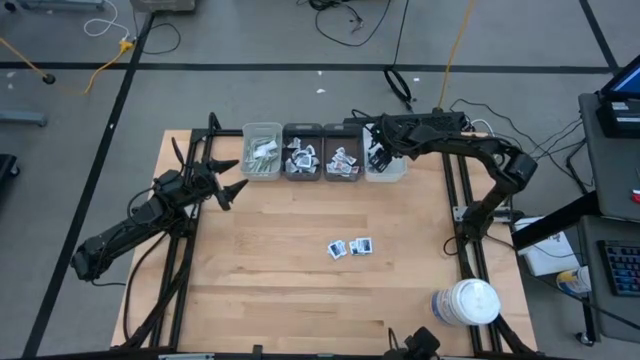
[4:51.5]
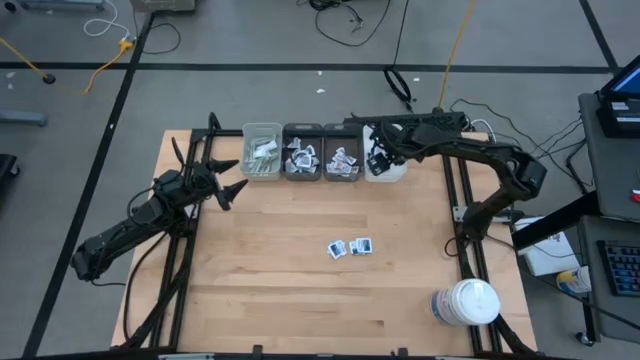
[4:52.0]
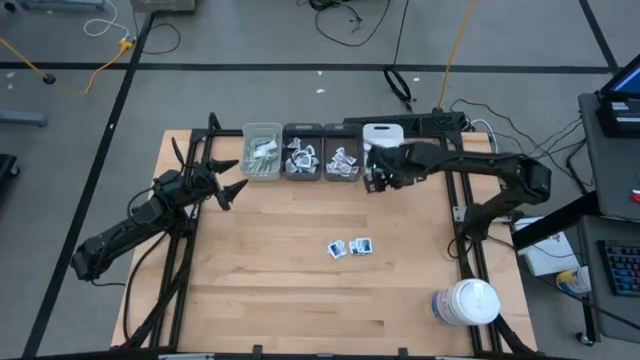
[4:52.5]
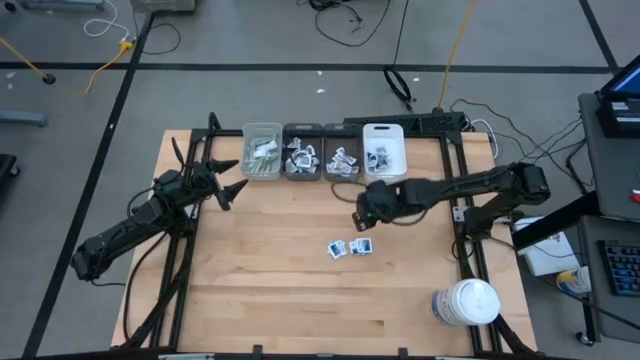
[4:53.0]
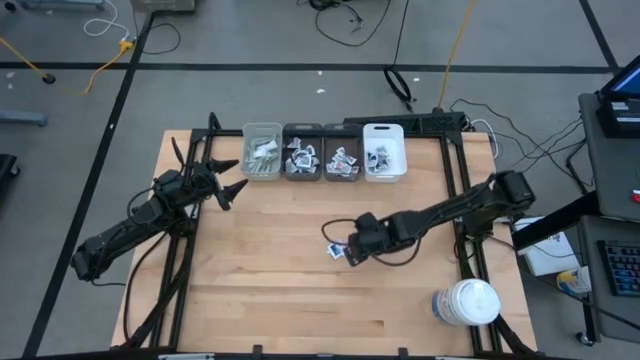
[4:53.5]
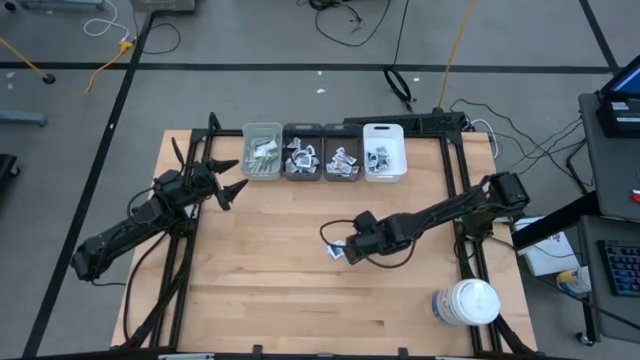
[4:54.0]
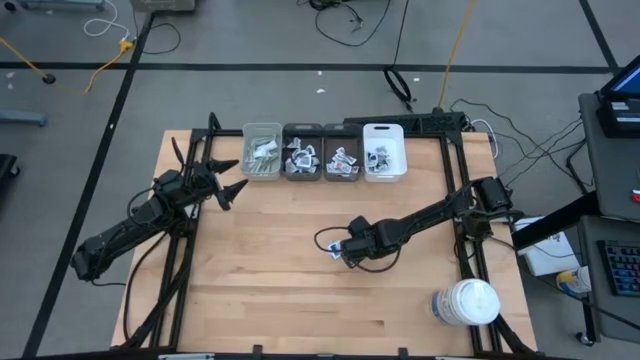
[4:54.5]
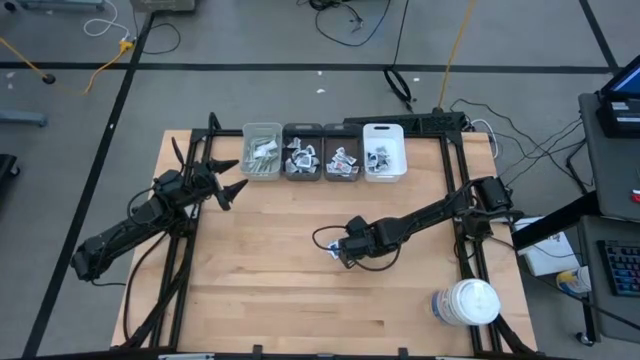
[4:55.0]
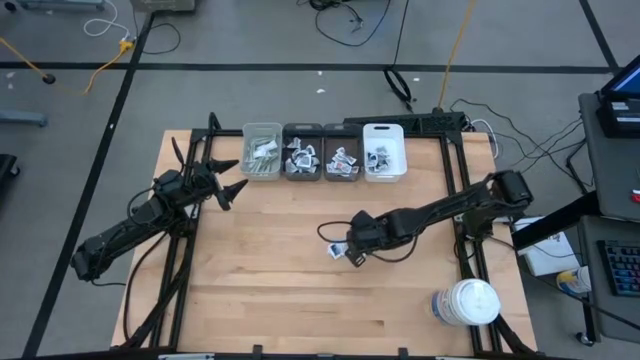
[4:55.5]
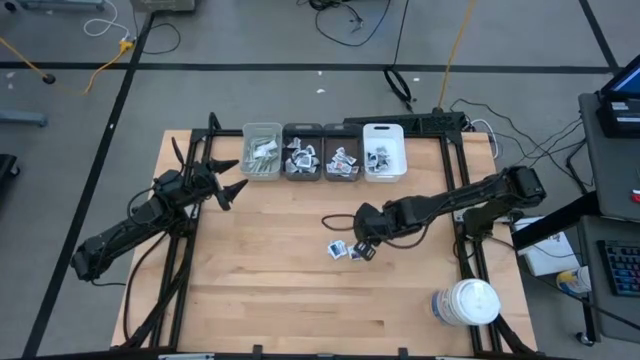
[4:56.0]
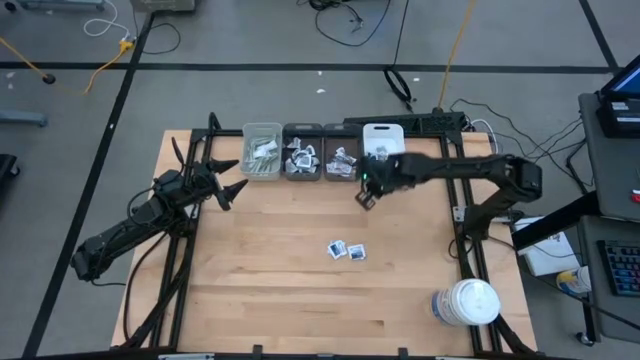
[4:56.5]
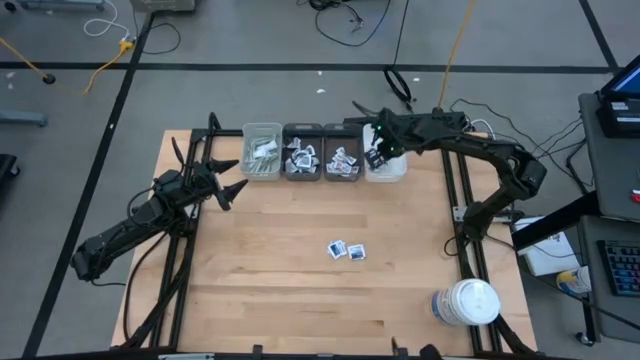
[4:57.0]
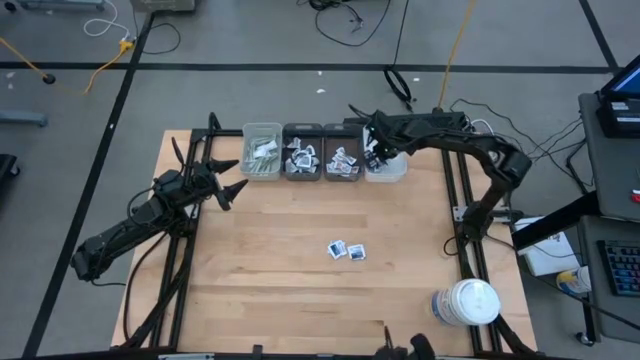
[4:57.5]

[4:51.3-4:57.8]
Task: Pick & Place First Aid Supplies
Put the alcohol pad into the white bin

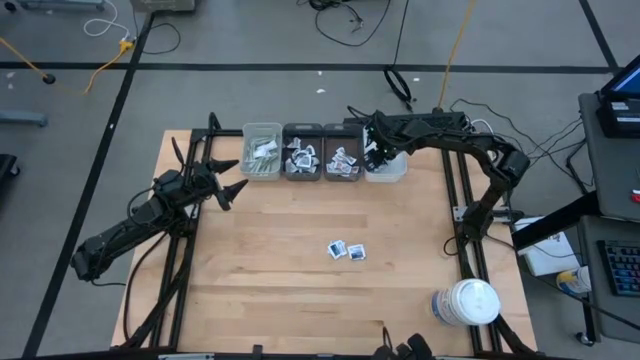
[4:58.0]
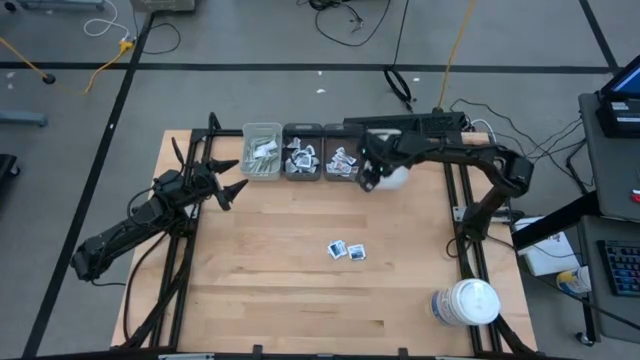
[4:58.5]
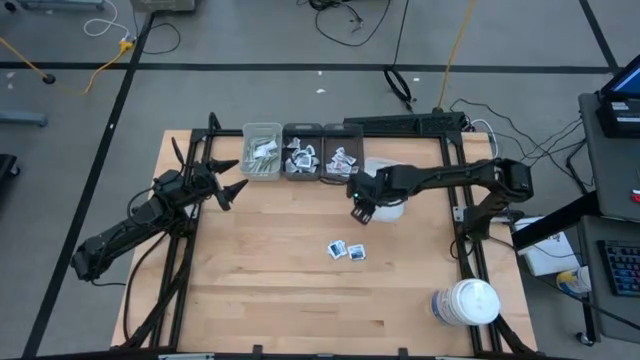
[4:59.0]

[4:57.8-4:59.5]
Put the alcohol pad into the white bin

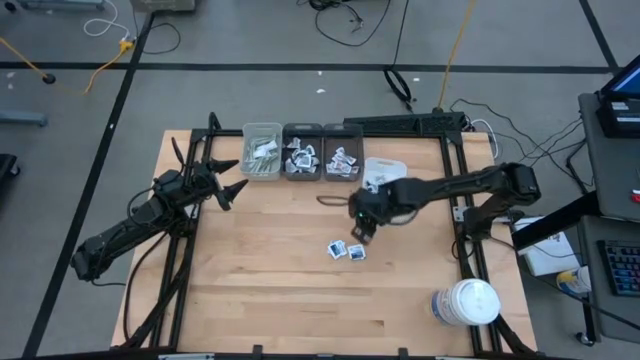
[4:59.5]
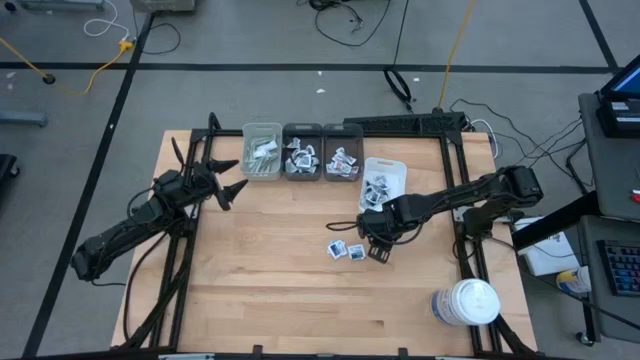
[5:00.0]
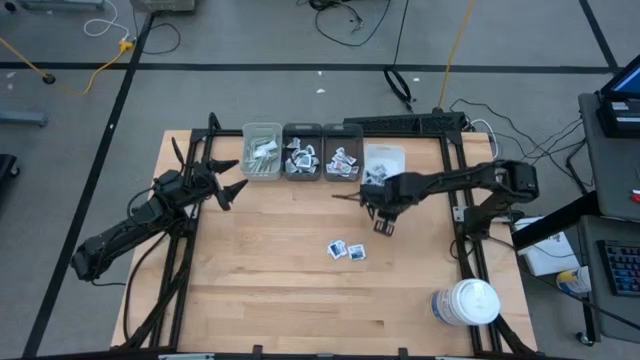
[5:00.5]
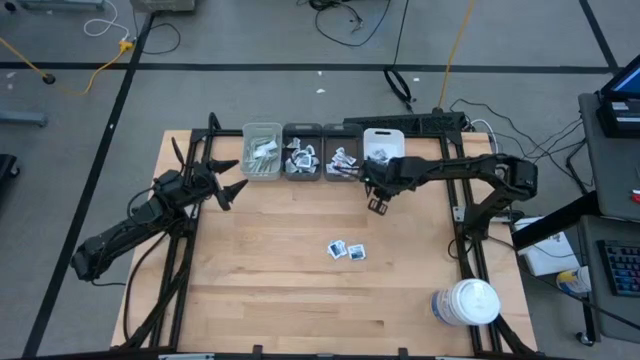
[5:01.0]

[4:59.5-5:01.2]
Adjust the white bin

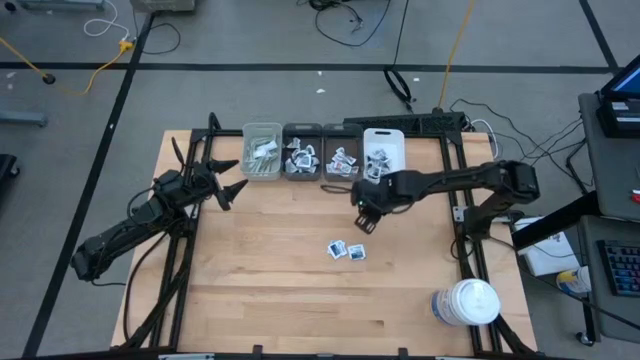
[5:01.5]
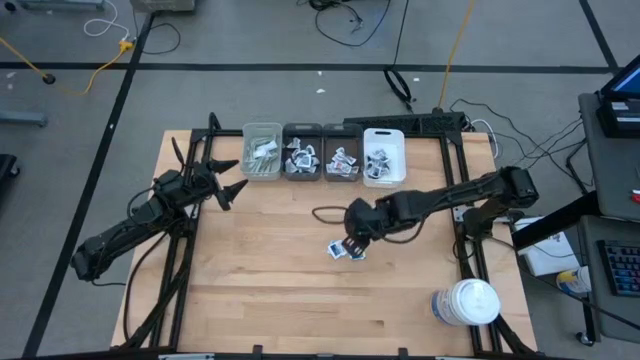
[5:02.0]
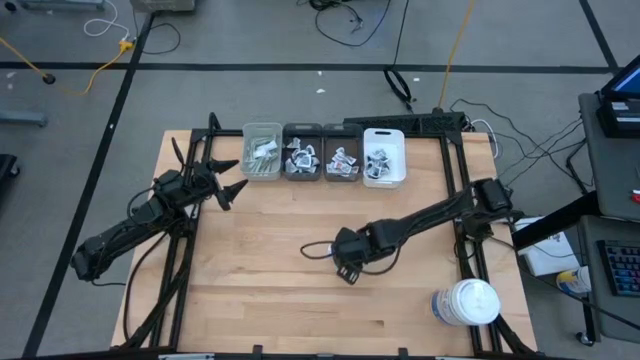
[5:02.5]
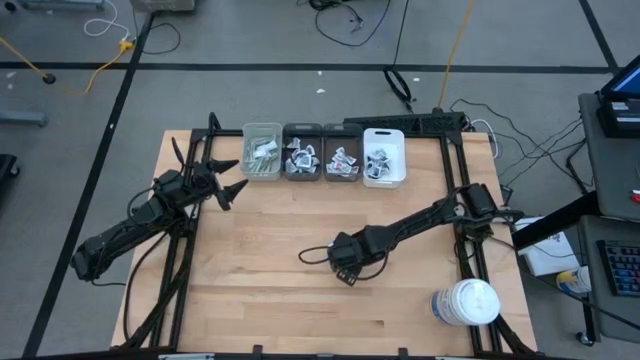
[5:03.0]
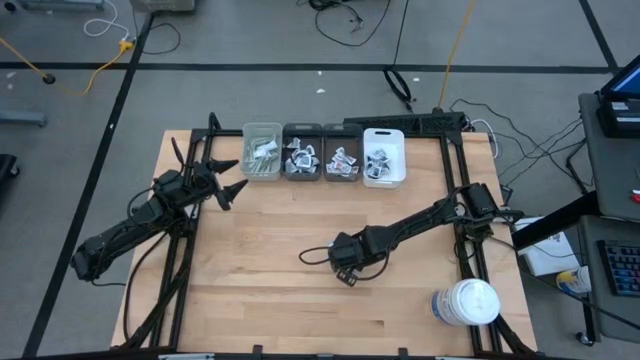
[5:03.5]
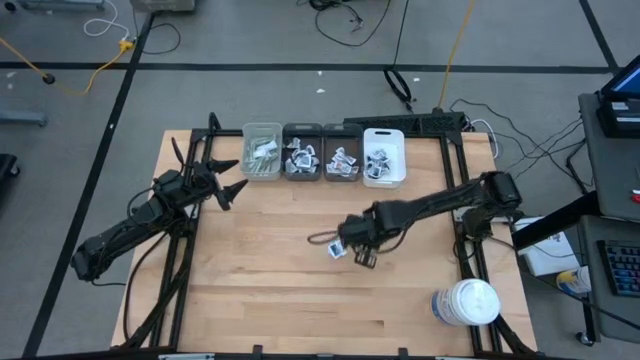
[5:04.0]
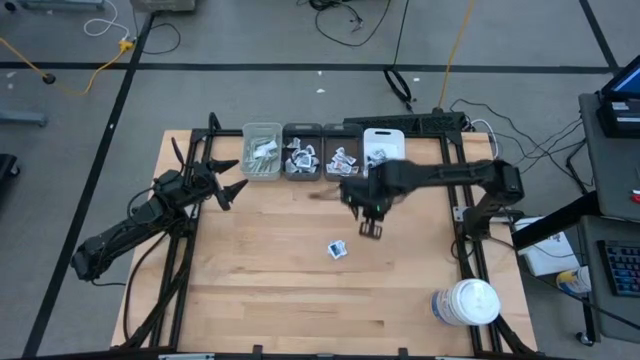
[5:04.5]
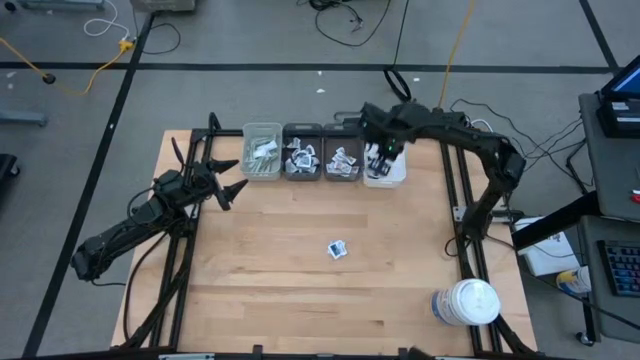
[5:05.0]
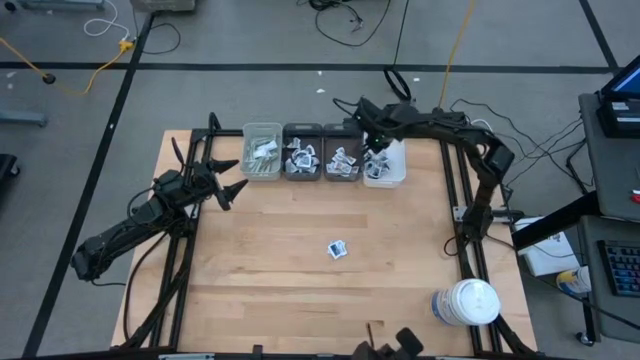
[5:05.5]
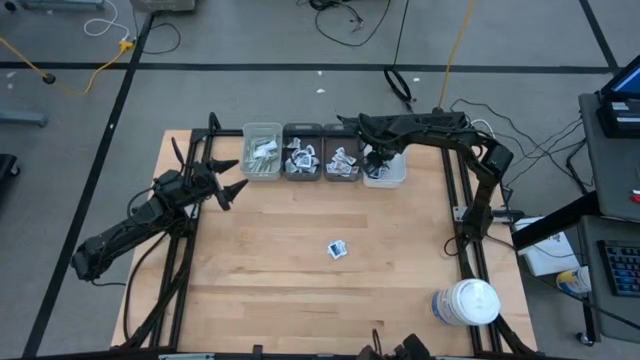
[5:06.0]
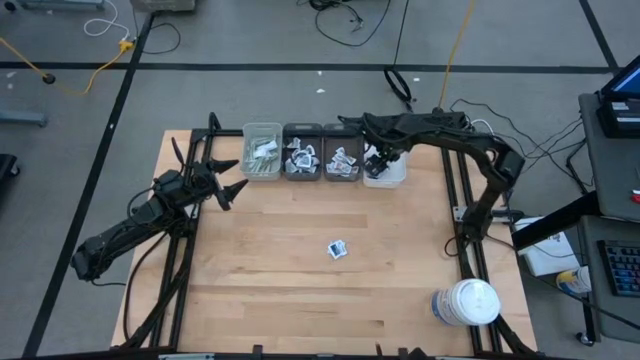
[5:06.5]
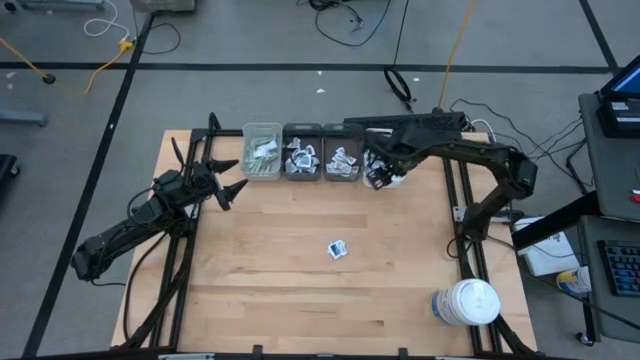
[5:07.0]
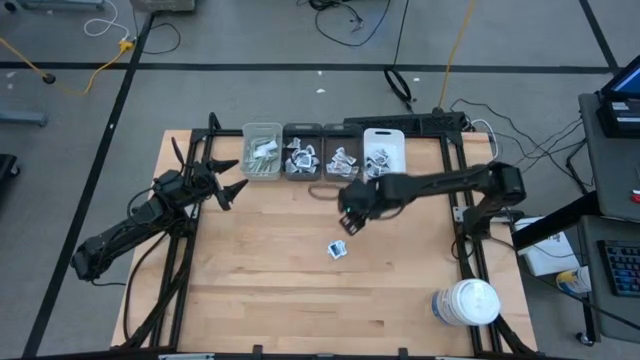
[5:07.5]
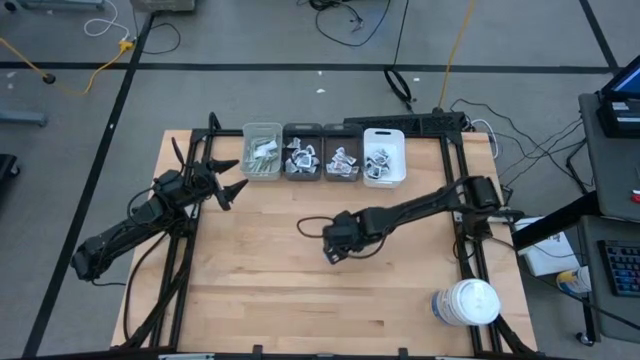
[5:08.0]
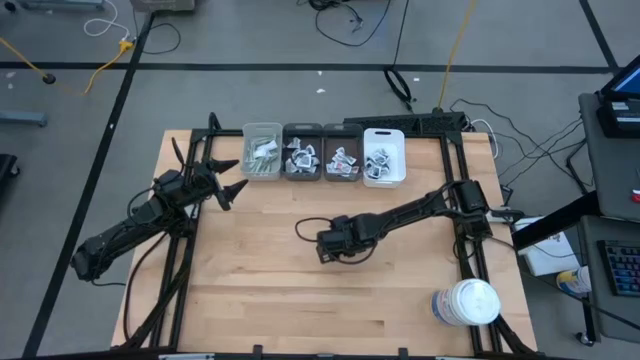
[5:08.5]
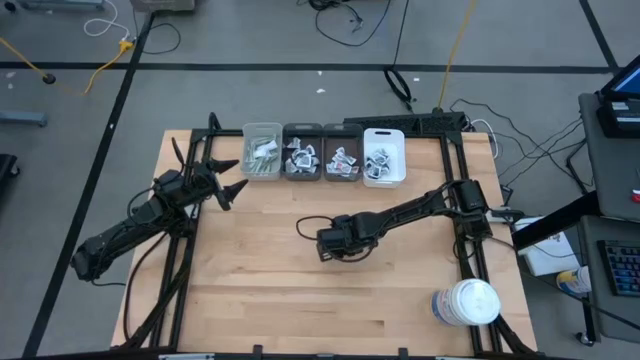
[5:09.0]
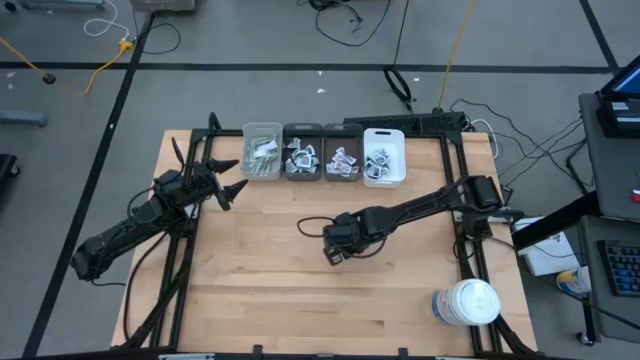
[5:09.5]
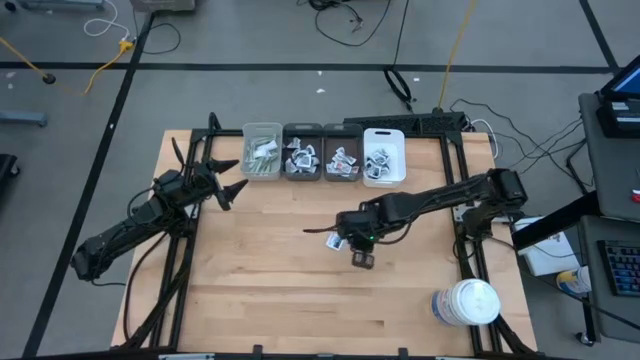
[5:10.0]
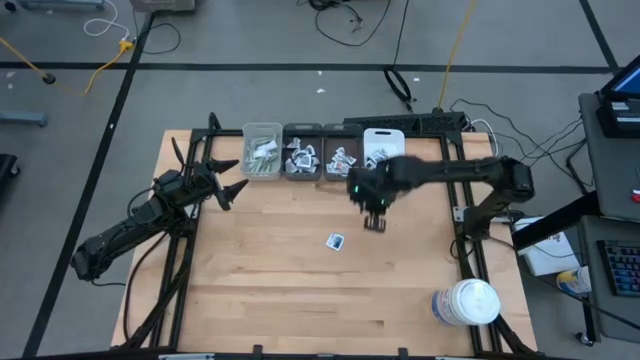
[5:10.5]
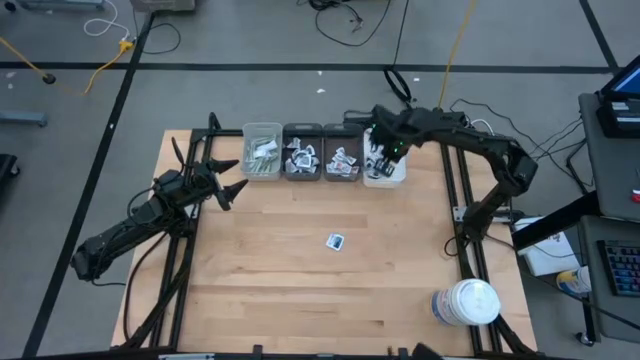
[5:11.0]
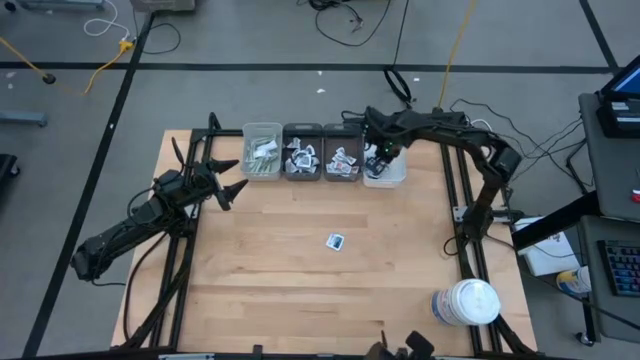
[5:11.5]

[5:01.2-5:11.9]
Put the alcohol pad into the white bin
